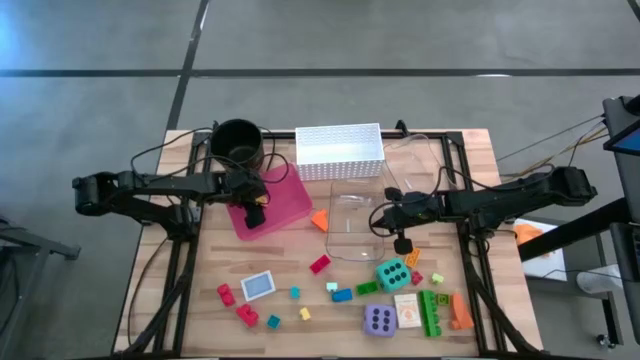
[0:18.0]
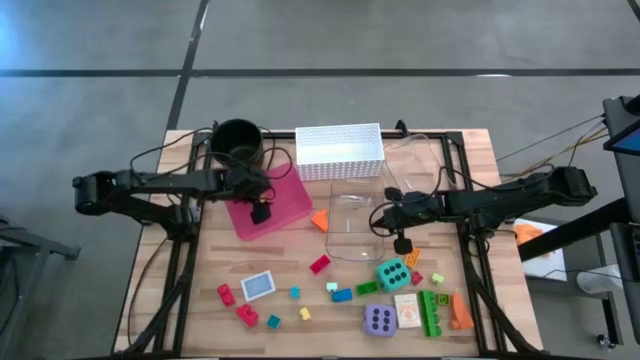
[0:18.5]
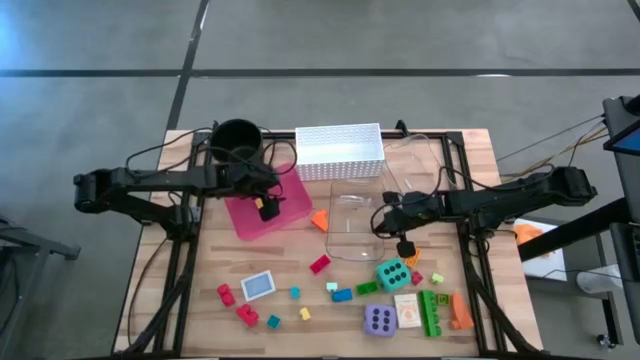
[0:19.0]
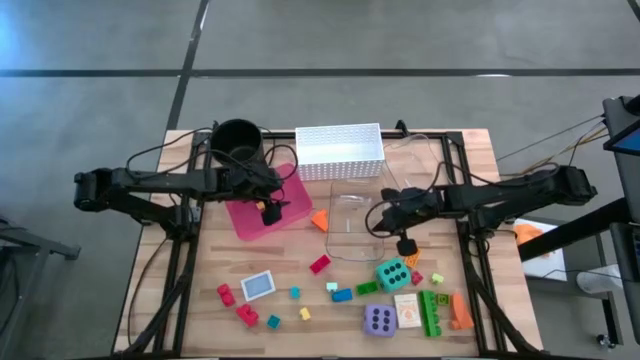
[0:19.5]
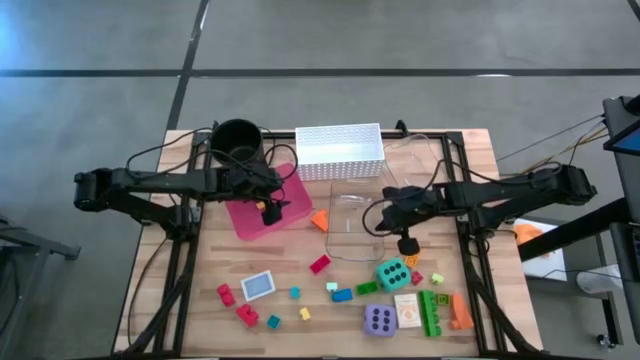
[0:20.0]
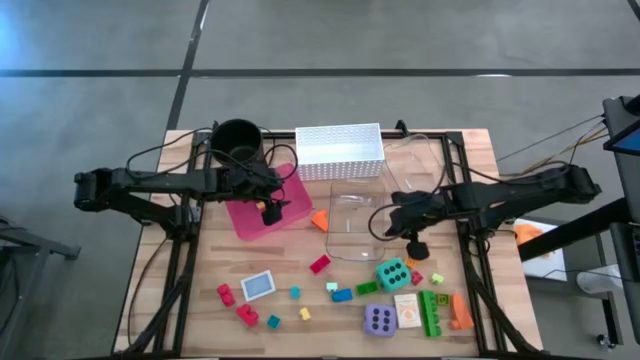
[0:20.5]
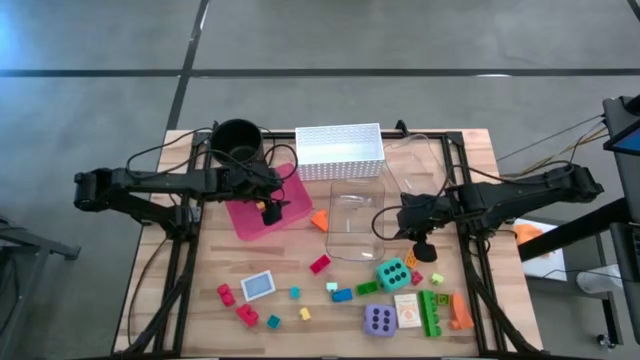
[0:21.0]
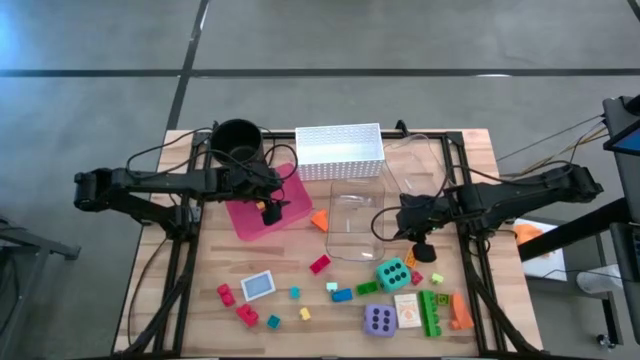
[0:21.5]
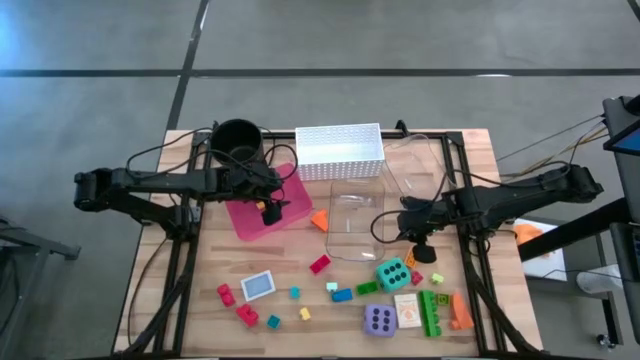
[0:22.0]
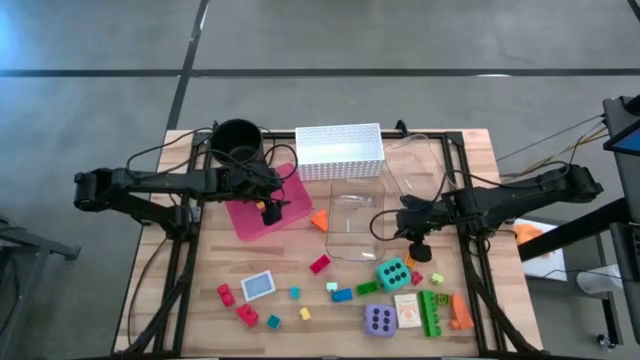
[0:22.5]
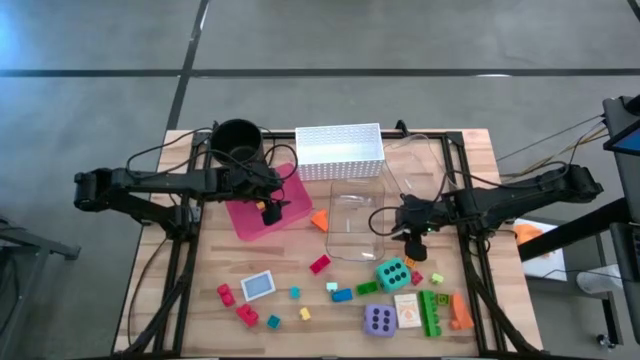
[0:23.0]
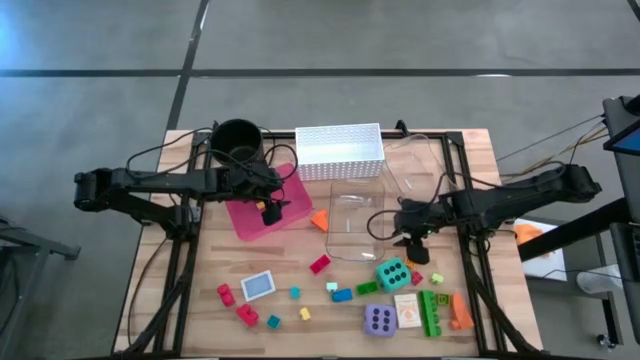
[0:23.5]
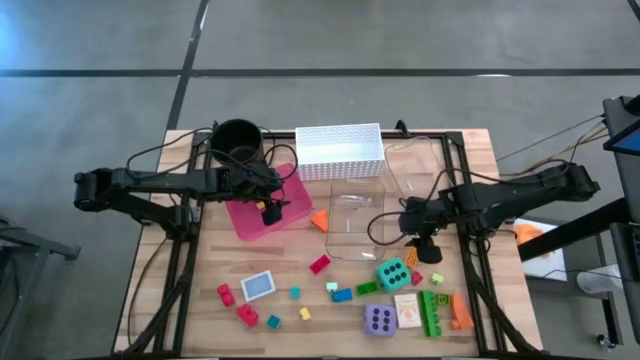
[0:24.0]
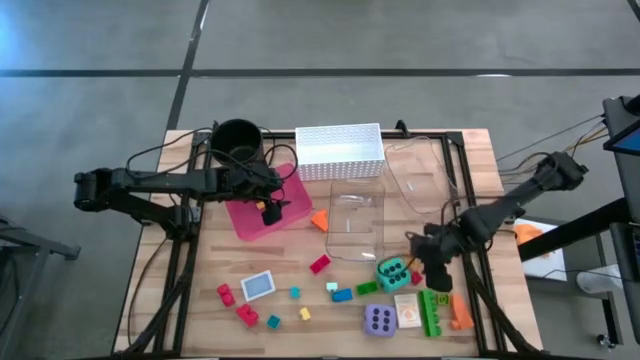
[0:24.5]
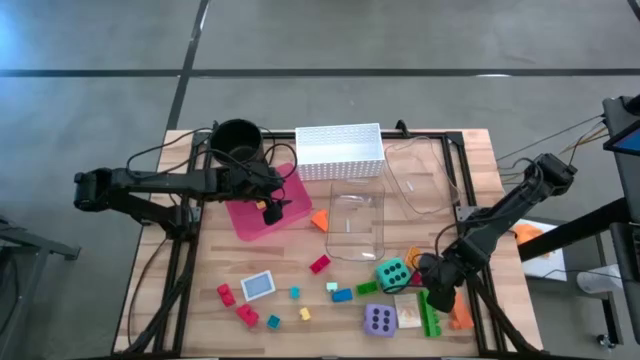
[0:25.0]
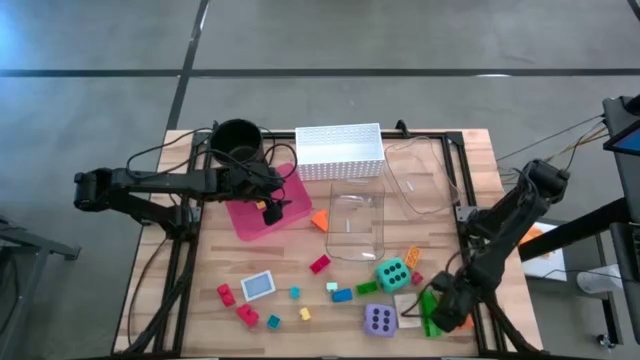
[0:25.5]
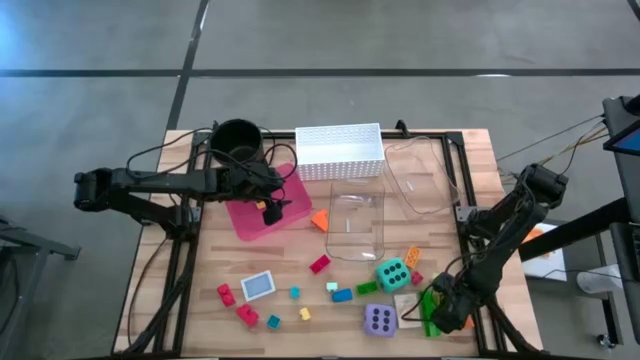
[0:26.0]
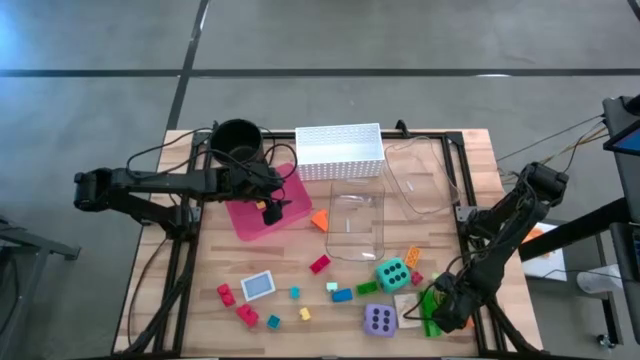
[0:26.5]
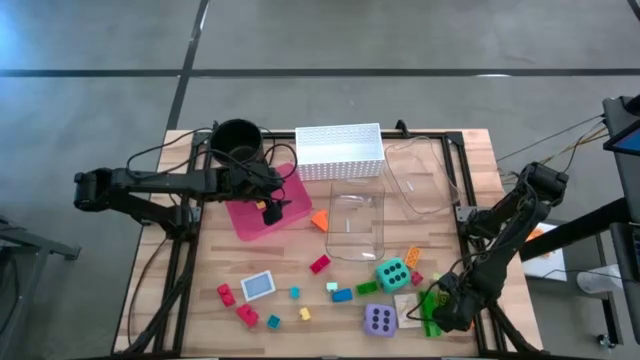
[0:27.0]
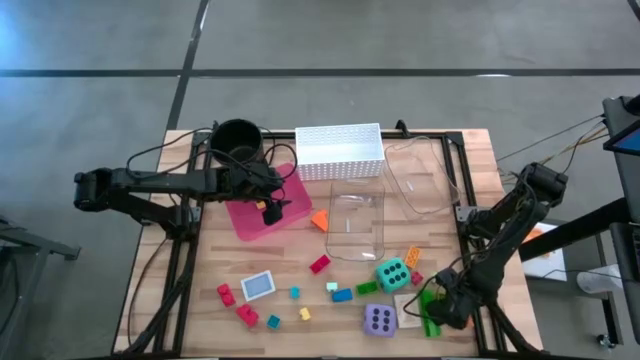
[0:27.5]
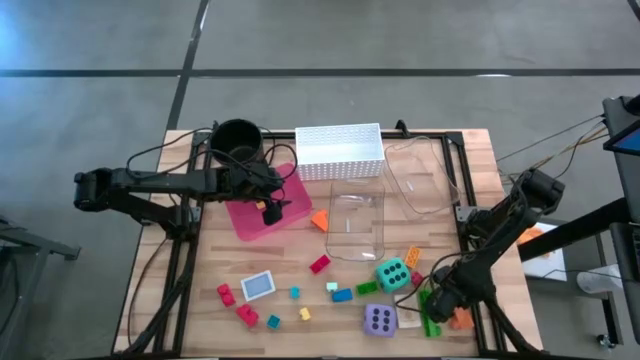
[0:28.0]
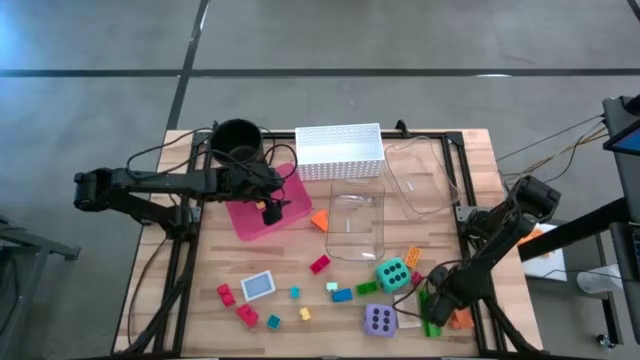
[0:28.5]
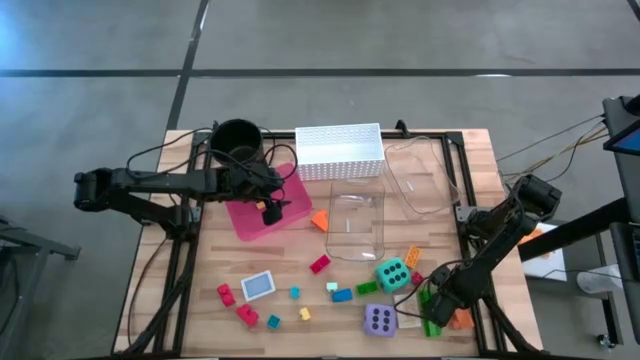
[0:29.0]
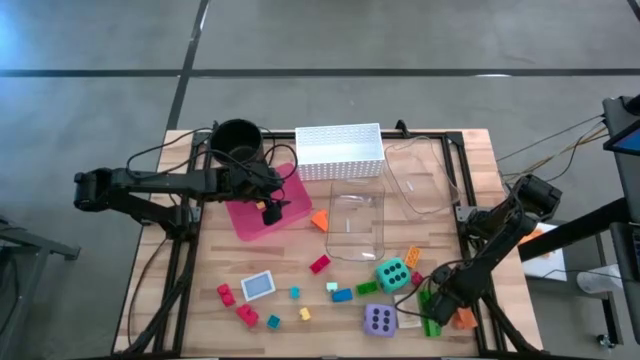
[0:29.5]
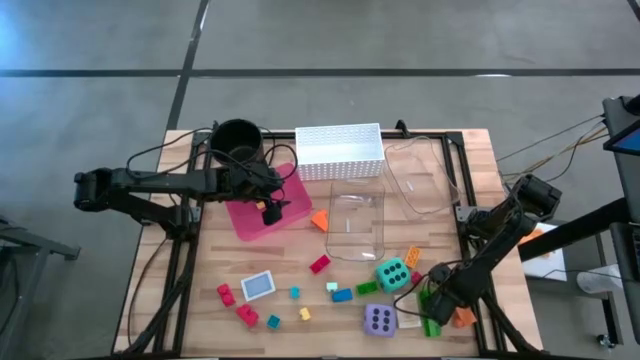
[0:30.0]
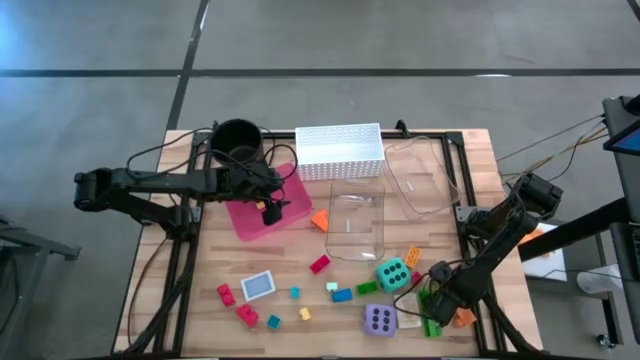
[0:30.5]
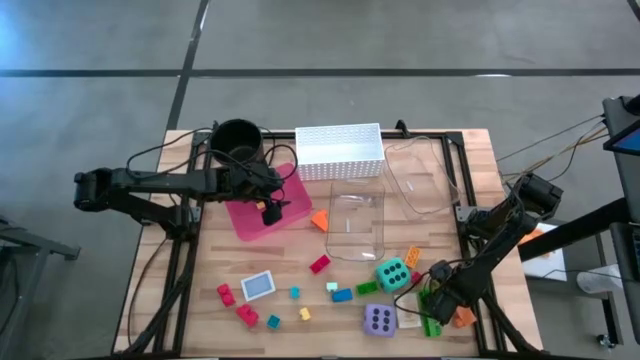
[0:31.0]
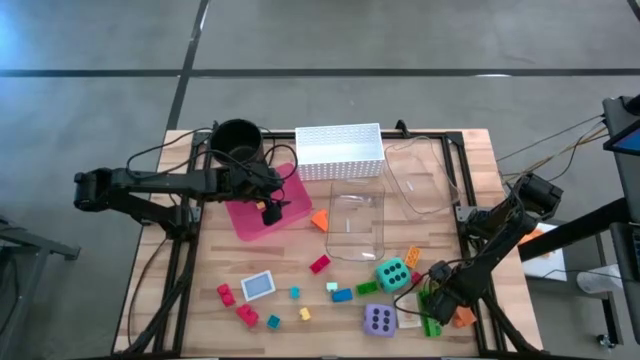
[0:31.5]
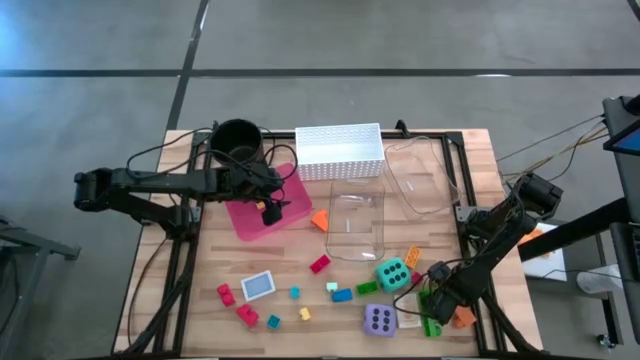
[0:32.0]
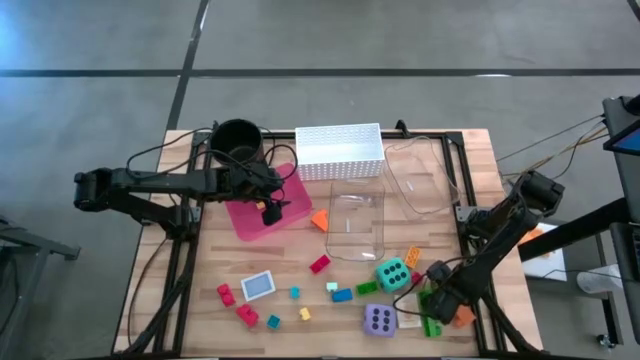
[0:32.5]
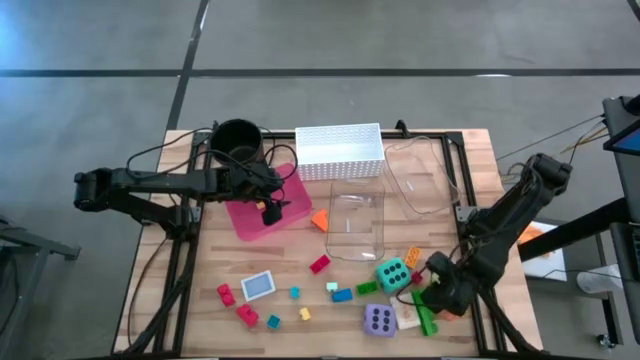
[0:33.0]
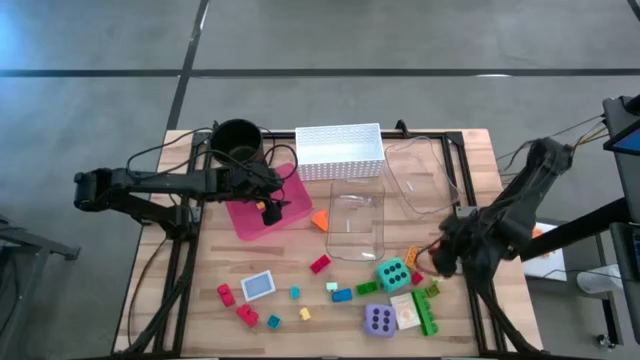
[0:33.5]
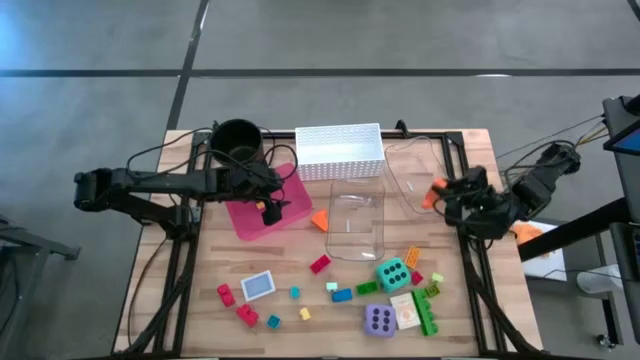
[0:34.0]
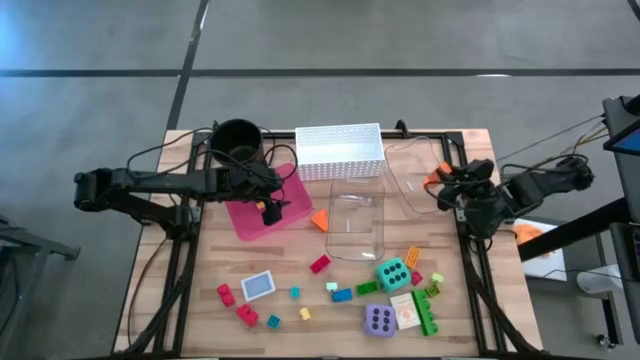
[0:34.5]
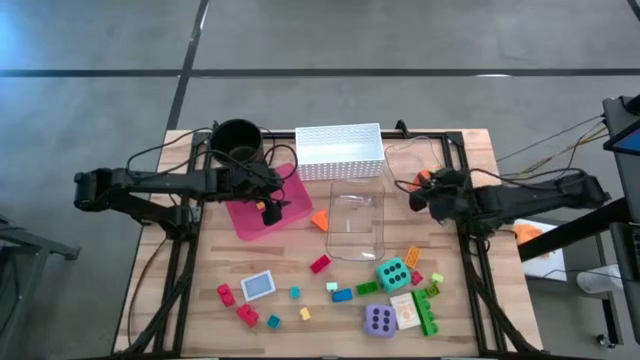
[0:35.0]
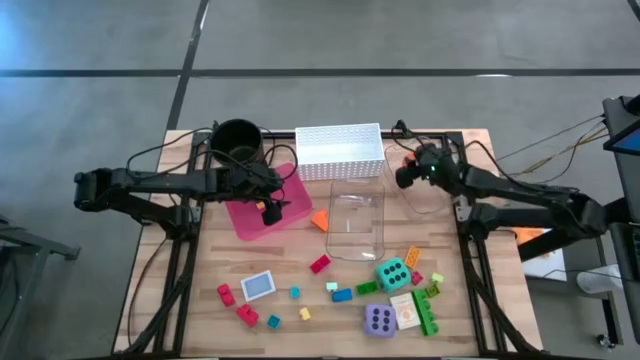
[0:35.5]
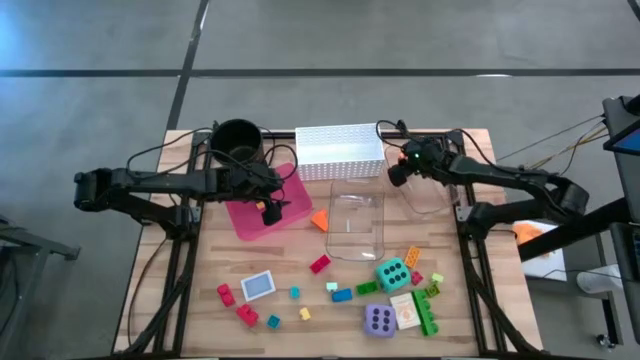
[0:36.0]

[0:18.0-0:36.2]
Task: Pick & Place Toys
Put the bottom large orange game piece into the top transparent bin

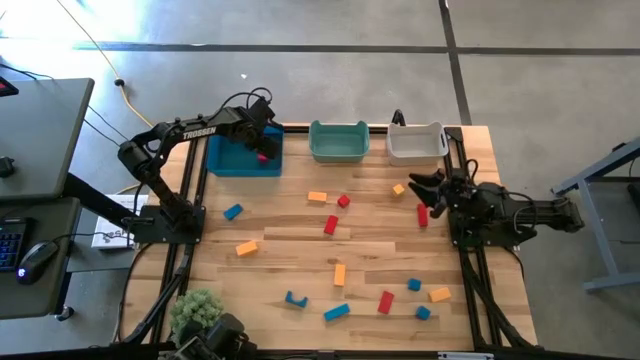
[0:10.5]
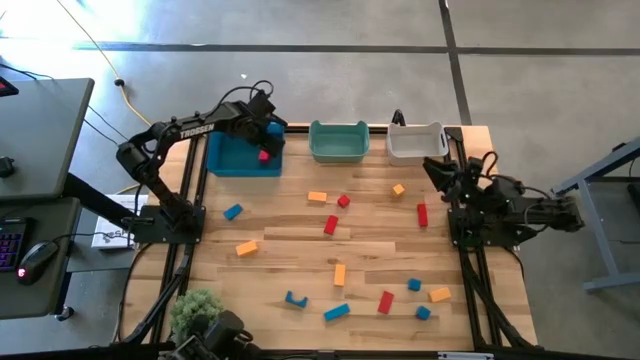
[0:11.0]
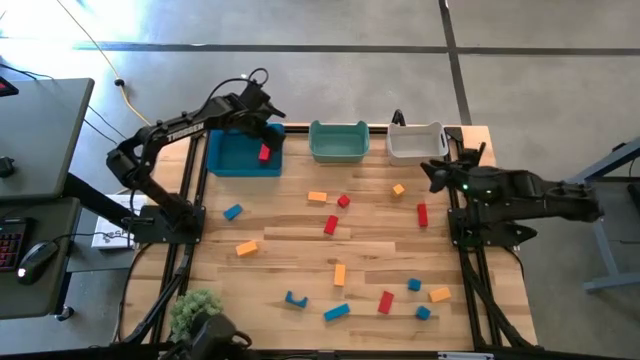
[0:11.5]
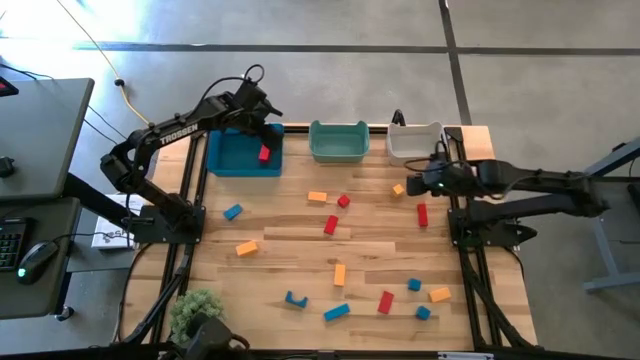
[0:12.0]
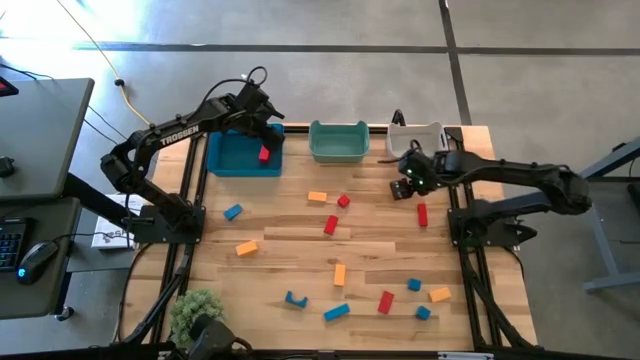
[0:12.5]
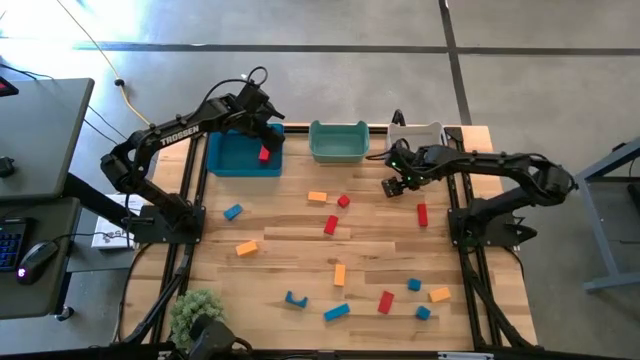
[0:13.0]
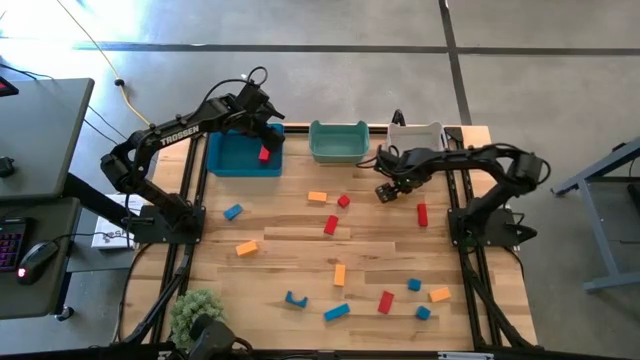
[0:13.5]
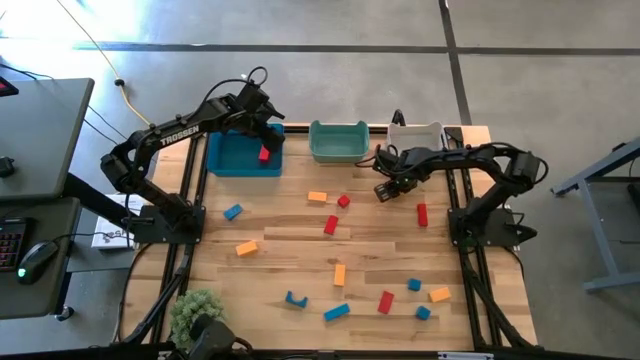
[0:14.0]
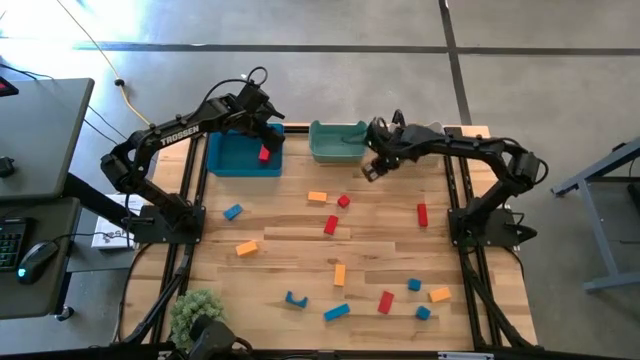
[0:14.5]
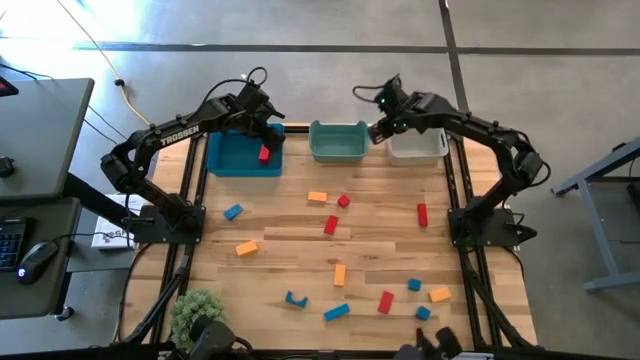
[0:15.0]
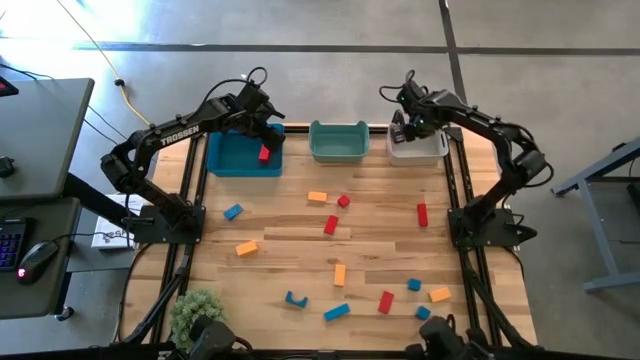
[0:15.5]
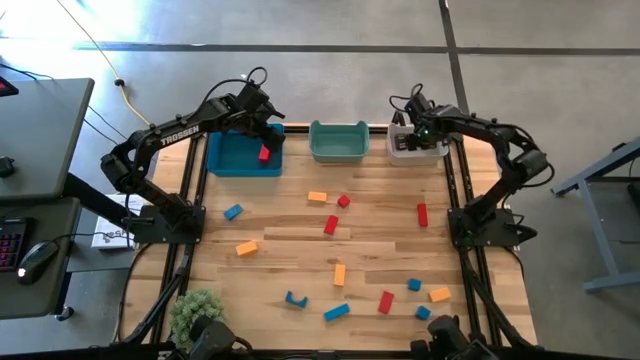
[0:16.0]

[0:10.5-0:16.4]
Task: Sort & place blocks by color
Put the yellow block into the gray bin
